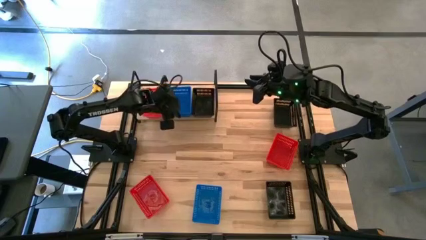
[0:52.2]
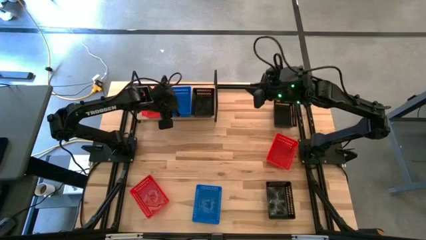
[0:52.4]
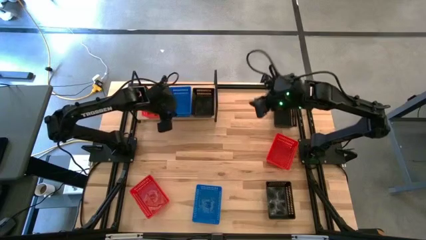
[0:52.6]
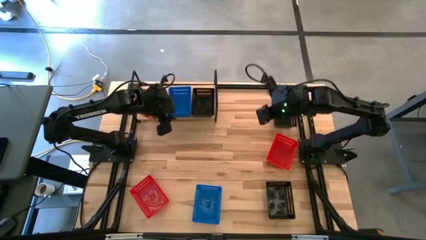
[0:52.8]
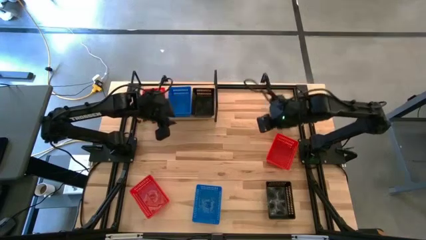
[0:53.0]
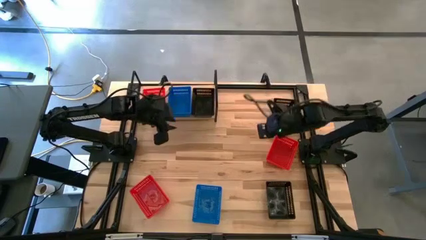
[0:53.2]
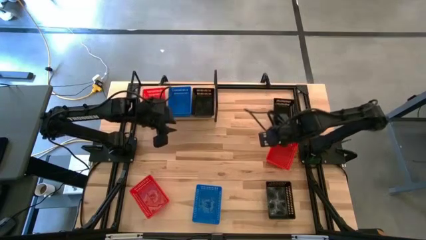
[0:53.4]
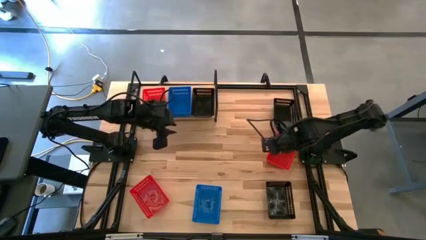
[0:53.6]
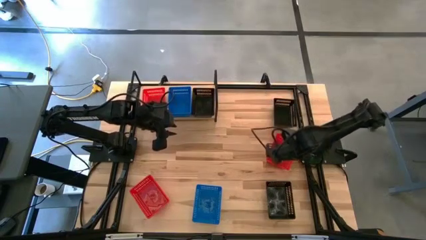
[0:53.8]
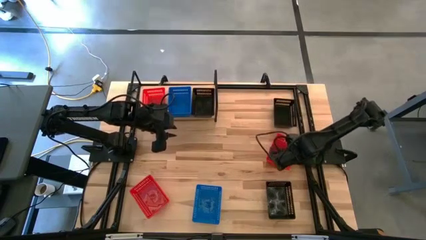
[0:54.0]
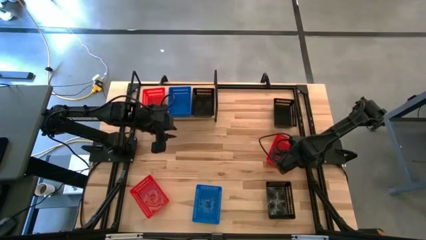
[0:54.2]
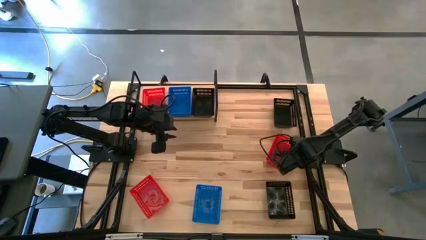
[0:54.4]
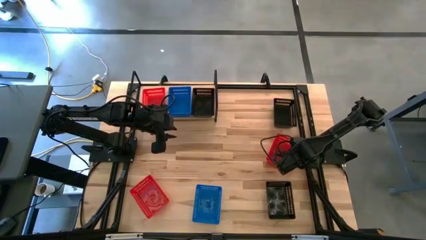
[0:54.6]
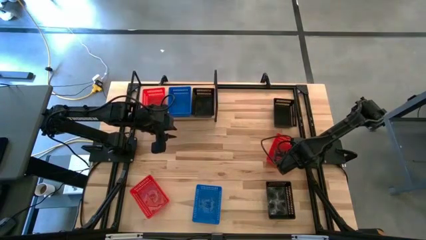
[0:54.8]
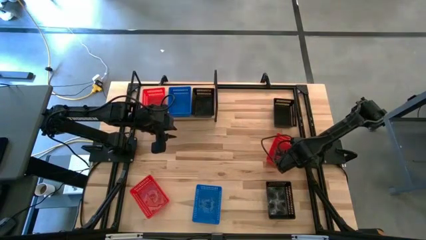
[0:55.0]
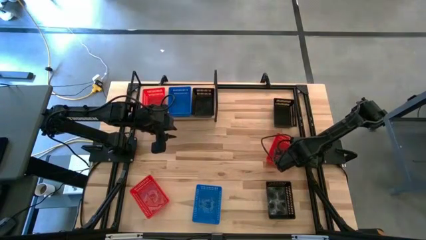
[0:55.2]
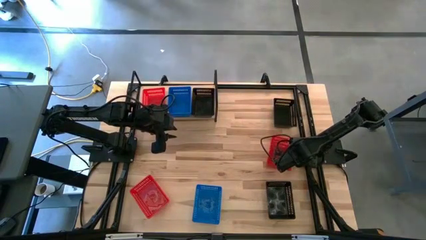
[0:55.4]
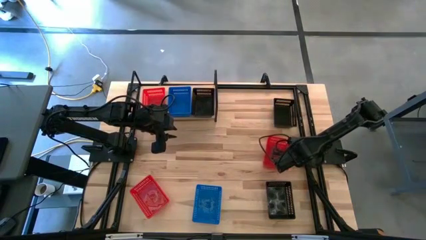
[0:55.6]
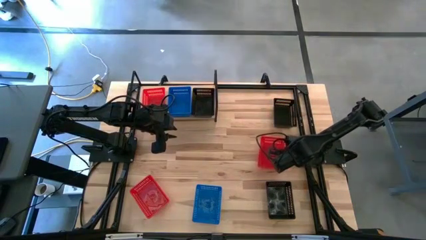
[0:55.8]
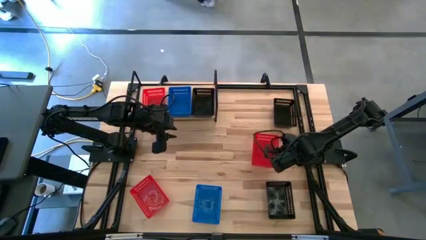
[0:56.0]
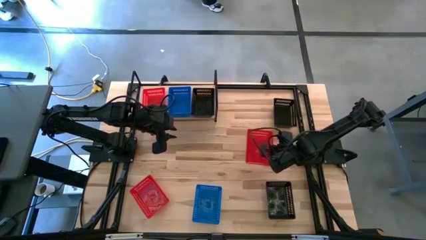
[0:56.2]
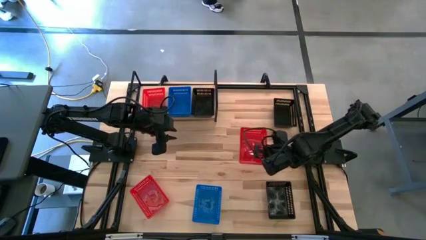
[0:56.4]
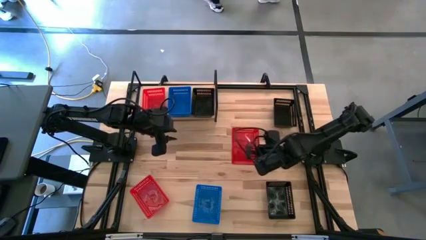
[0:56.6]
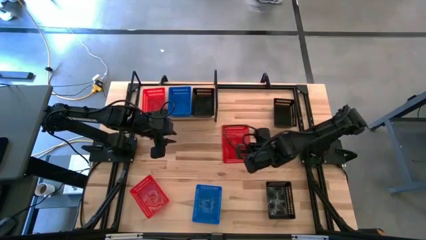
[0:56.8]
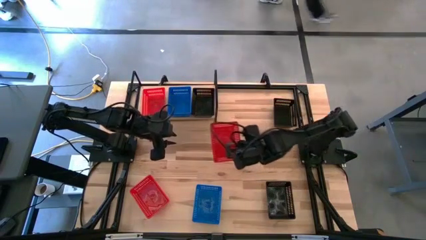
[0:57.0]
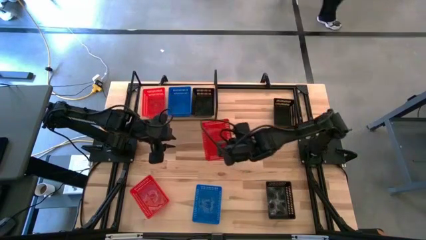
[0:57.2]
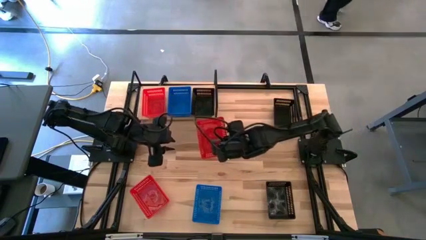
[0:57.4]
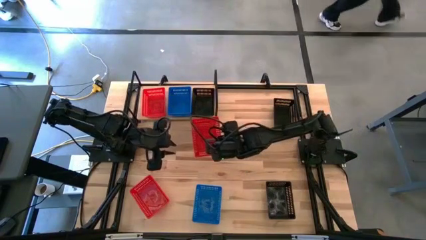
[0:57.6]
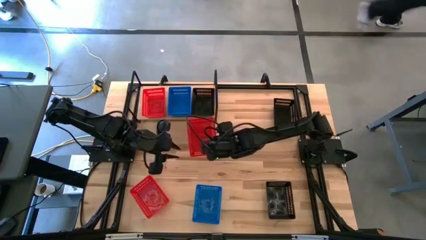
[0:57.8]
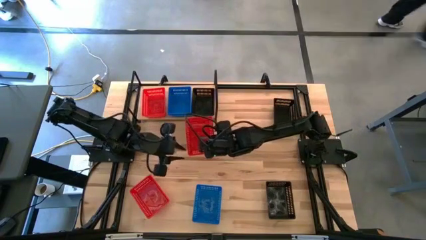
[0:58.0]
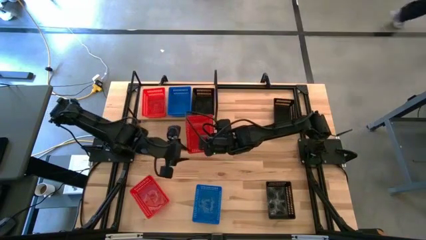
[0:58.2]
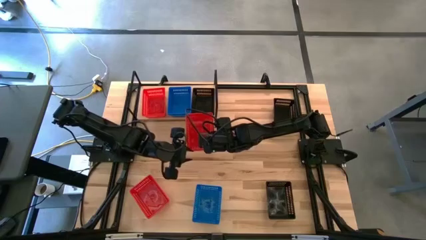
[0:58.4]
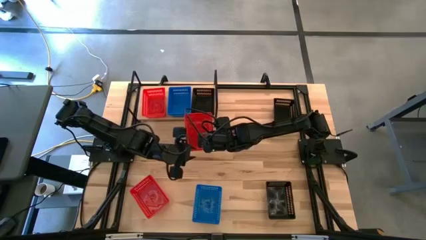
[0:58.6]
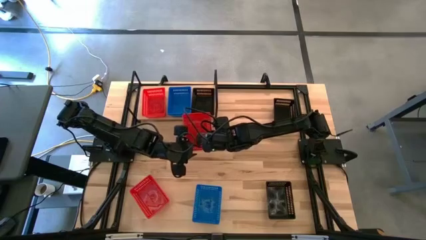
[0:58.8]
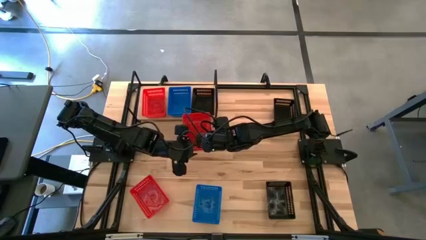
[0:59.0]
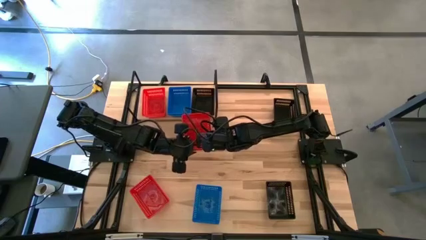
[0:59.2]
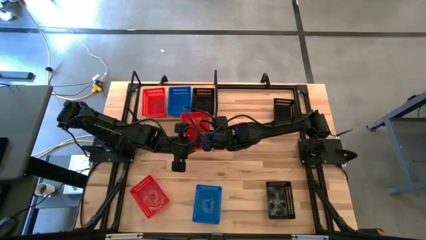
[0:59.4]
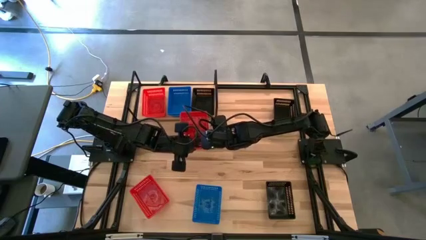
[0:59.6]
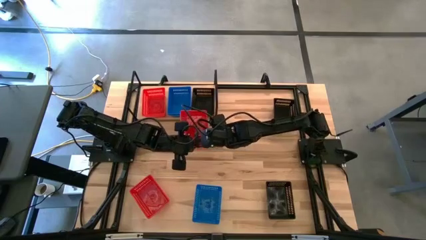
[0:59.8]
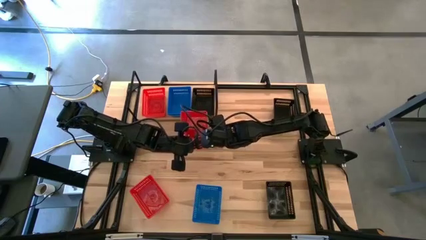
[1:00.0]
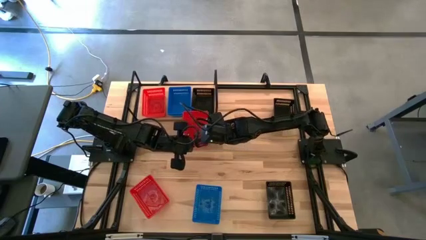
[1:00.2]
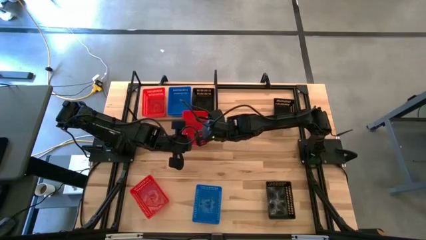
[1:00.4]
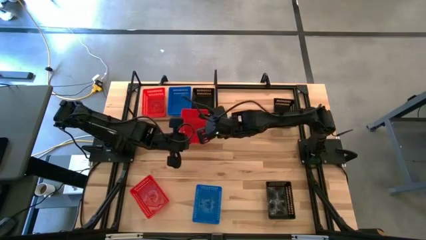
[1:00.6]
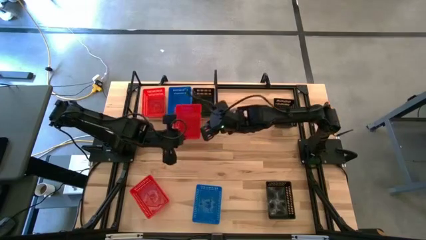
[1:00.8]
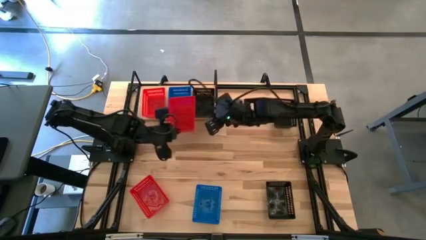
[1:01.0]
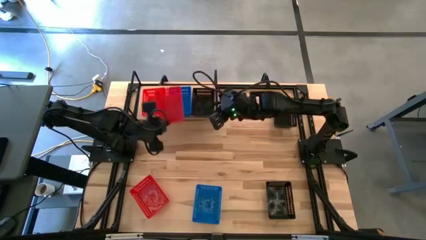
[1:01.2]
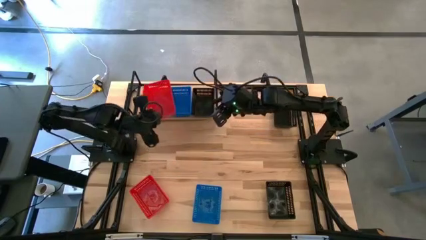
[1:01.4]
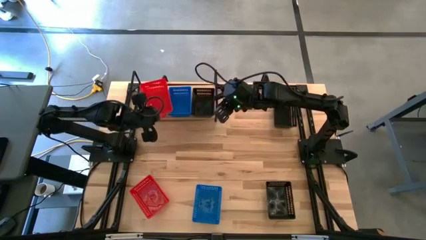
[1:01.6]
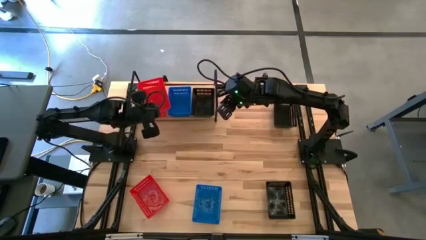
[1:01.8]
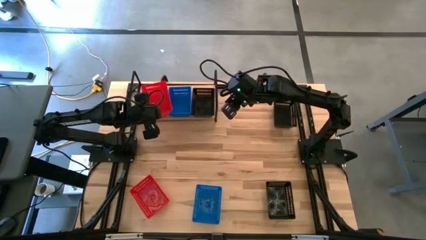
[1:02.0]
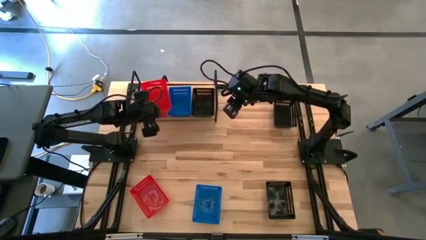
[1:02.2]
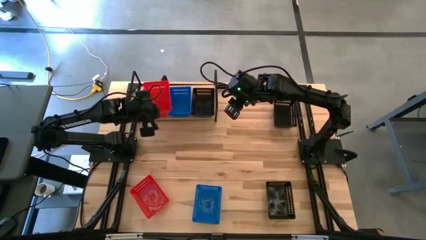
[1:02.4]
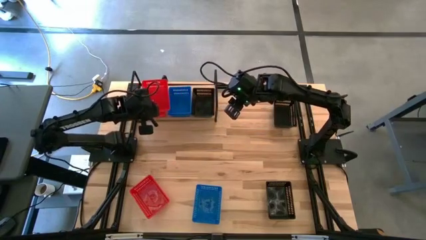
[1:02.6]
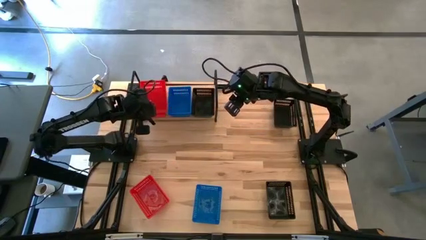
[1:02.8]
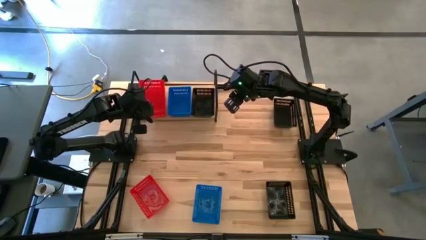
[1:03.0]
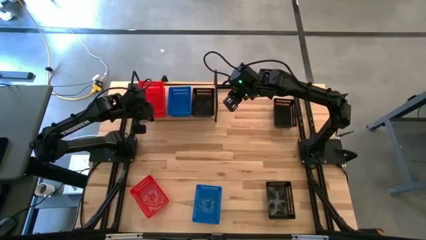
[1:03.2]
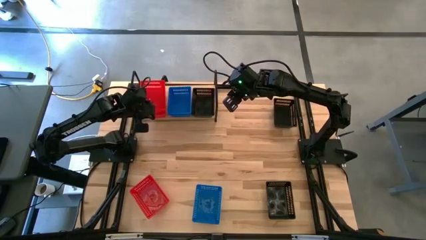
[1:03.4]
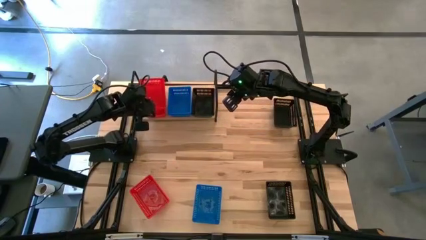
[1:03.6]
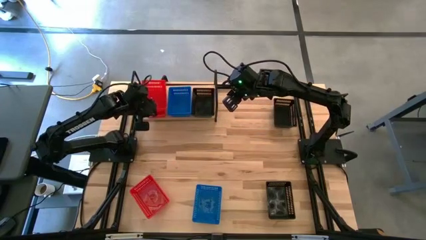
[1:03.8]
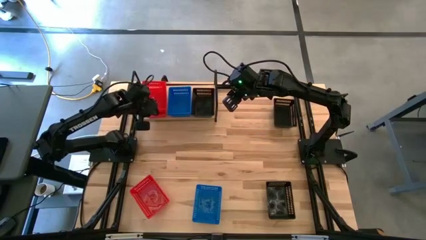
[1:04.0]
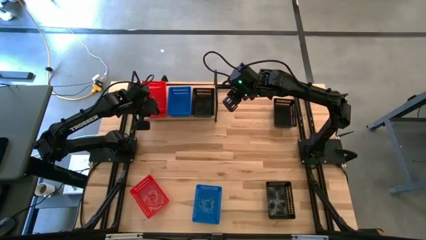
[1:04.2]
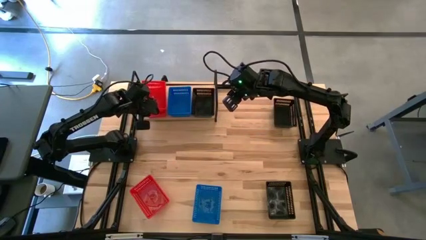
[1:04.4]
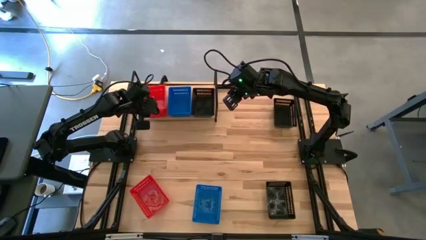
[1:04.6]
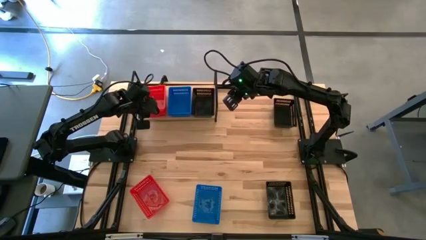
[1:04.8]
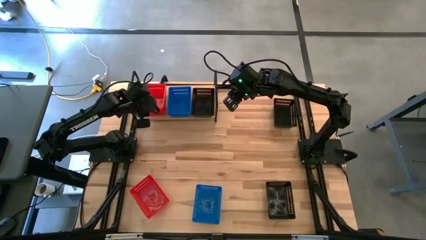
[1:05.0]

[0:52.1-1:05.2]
Task: Stack baskets on shelf by color
Stack the right red bin on the other red bin
